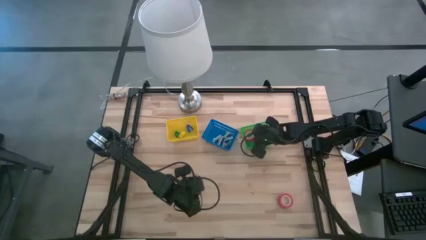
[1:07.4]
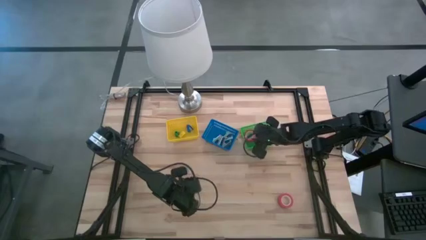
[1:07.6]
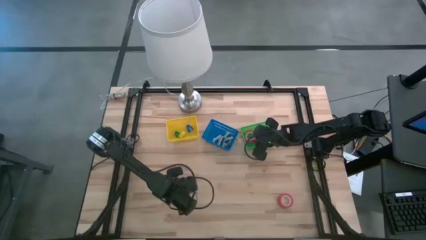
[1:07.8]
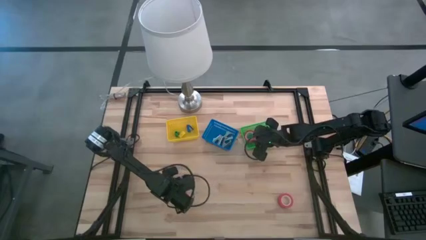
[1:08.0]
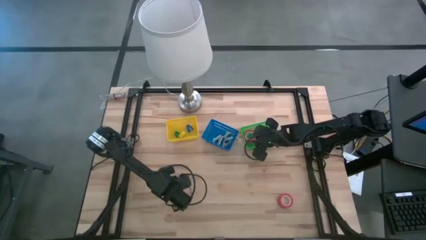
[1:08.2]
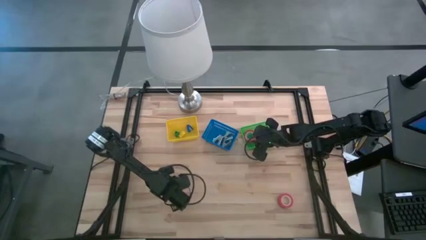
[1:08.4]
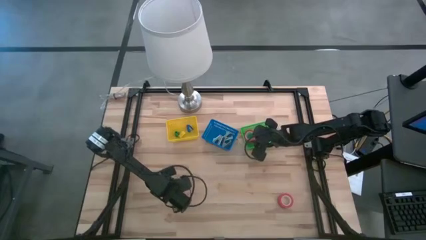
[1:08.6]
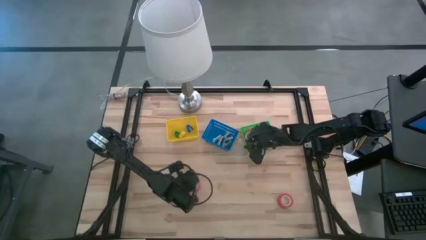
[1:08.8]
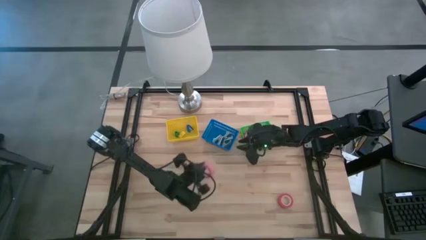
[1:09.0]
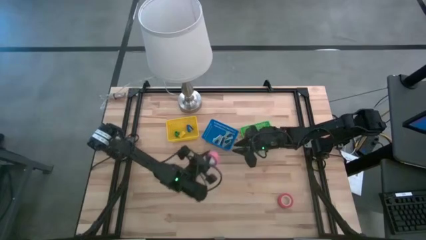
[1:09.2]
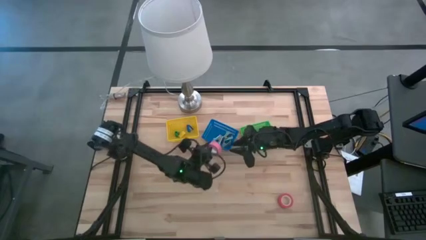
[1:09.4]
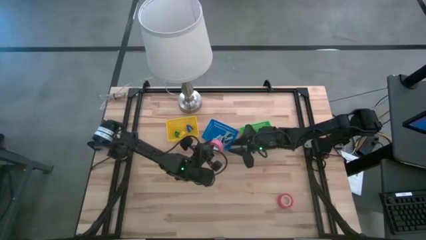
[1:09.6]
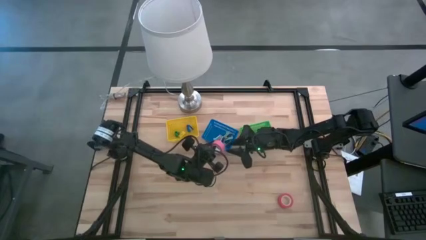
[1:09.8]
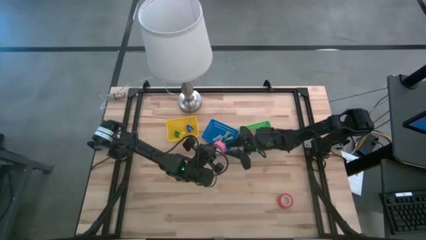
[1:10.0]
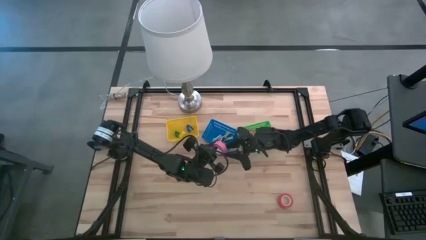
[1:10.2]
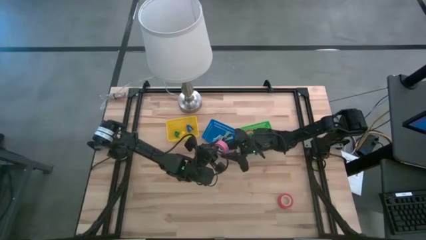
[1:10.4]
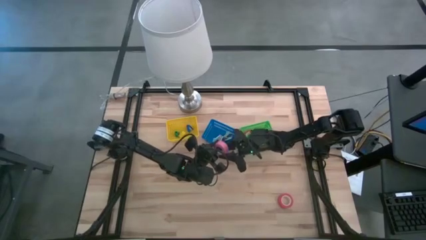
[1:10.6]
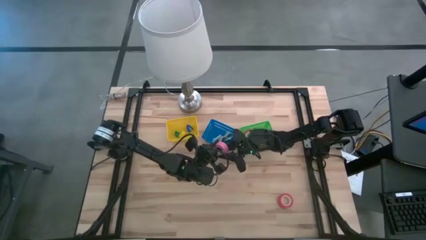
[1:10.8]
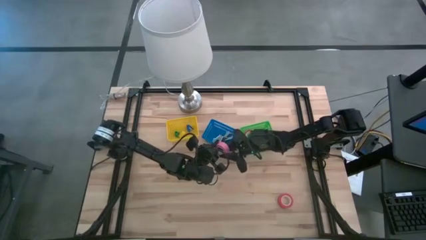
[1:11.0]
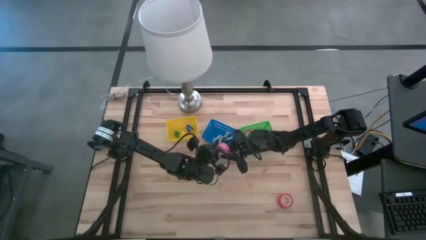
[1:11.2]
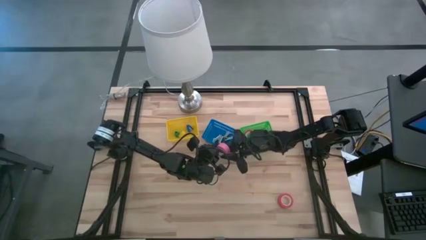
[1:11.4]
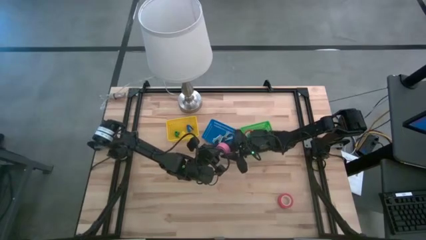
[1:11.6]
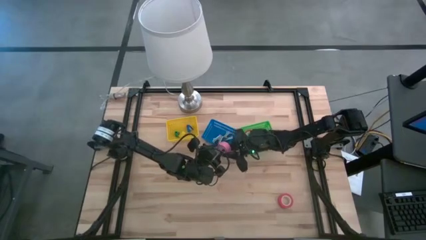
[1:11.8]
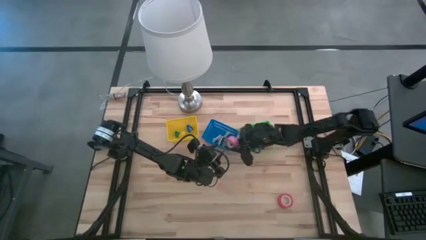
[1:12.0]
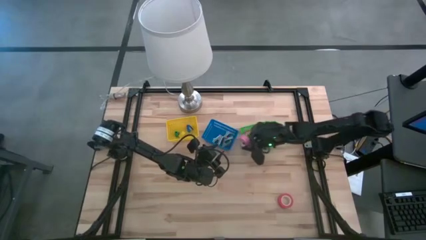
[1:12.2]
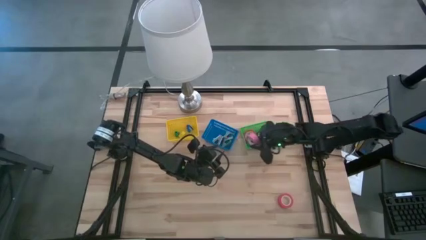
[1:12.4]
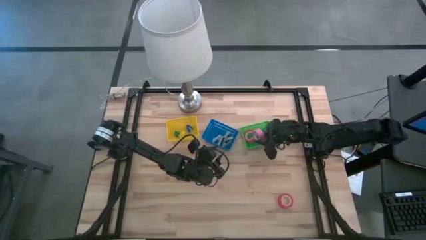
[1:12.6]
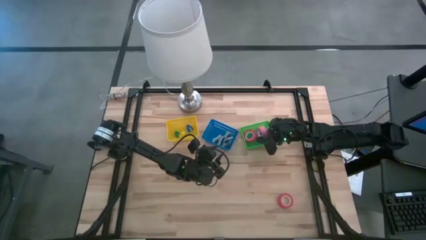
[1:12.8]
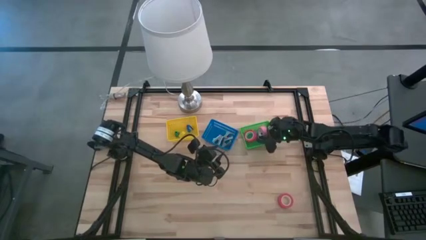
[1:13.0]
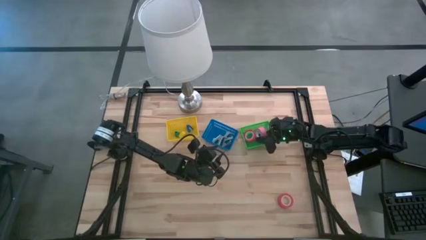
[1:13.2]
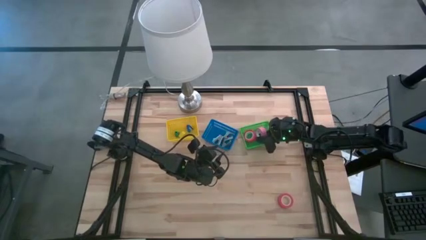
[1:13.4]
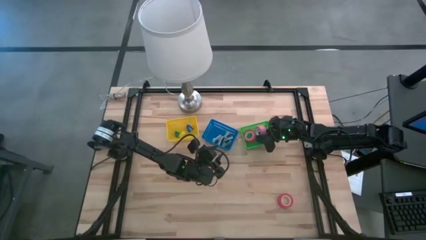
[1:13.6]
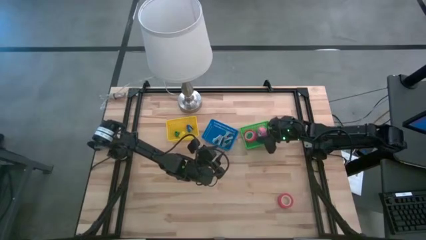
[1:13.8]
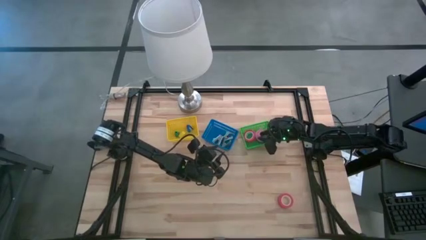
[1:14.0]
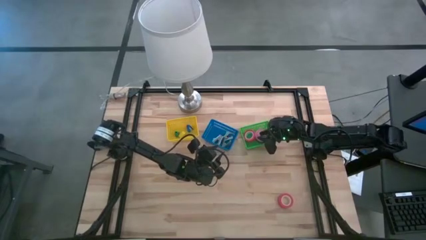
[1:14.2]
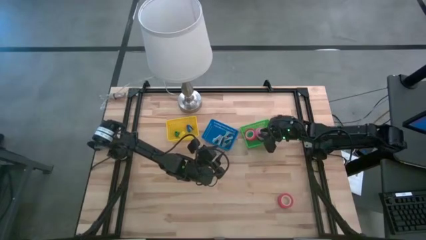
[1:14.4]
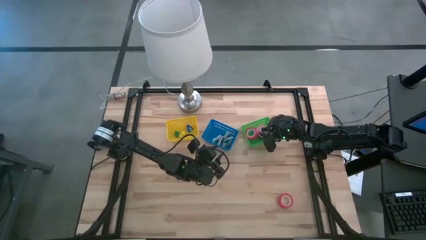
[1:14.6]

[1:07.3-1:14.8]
Task: Pick and place Stapler, Stapler remover, tape
Put the pink tape into the green bin

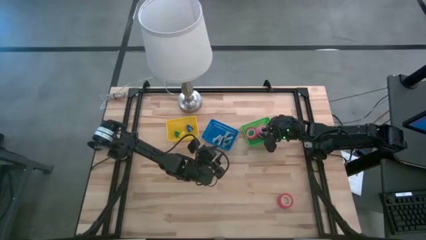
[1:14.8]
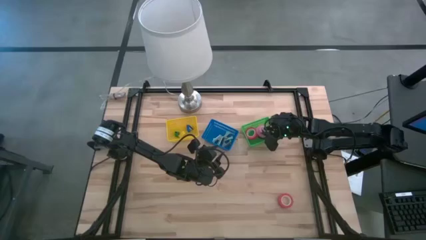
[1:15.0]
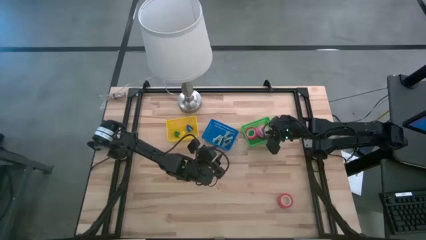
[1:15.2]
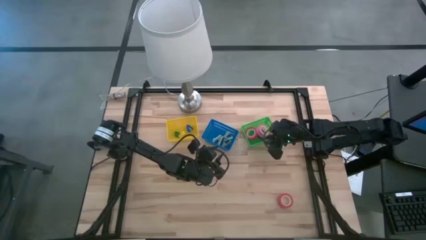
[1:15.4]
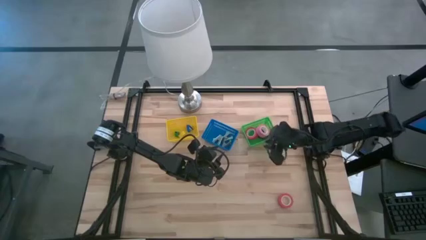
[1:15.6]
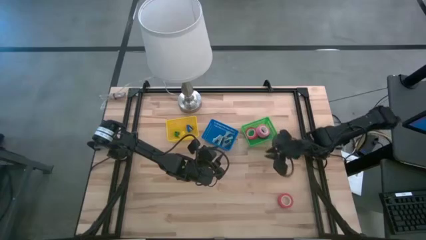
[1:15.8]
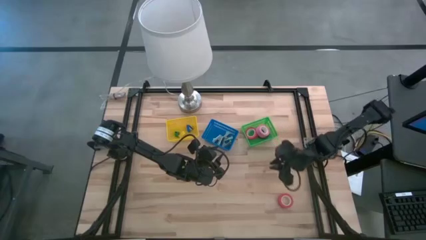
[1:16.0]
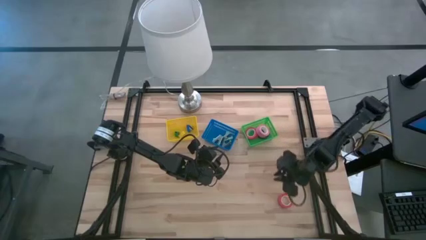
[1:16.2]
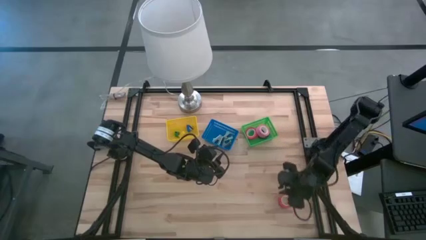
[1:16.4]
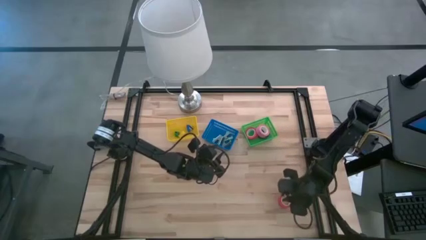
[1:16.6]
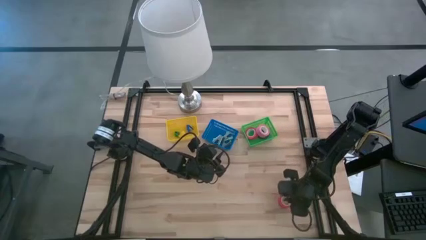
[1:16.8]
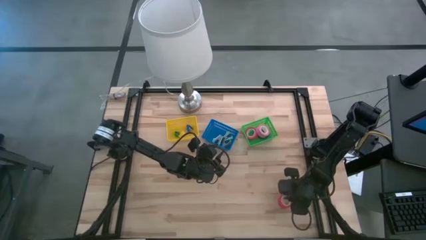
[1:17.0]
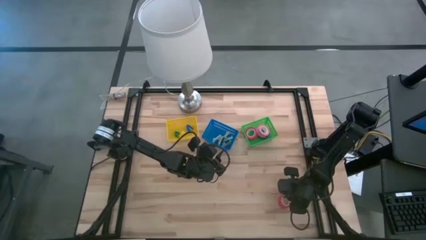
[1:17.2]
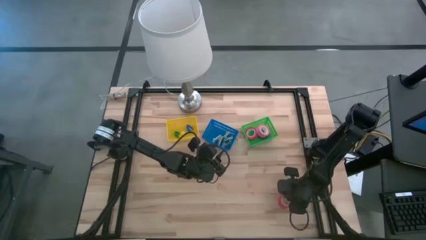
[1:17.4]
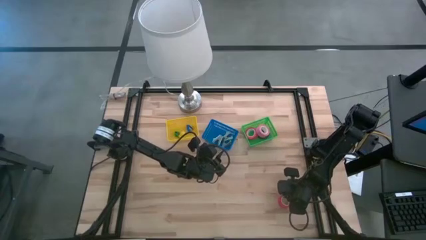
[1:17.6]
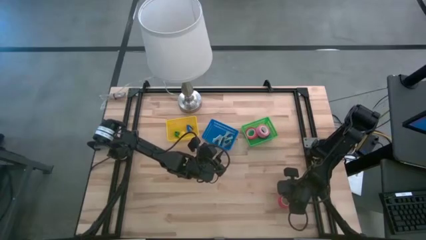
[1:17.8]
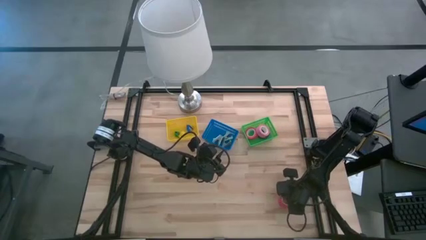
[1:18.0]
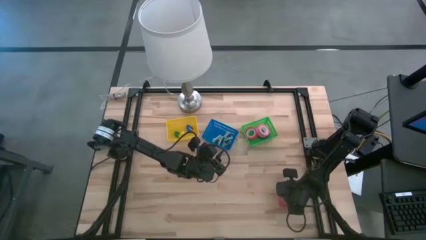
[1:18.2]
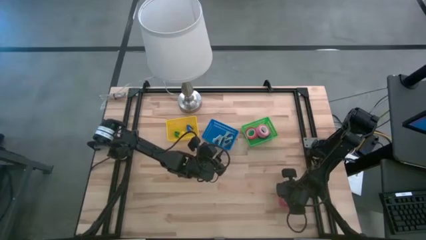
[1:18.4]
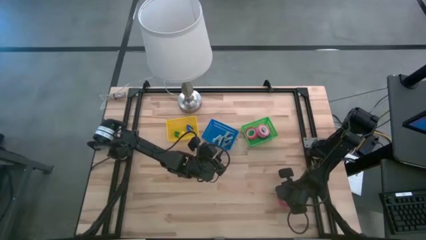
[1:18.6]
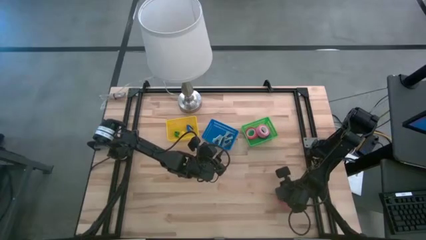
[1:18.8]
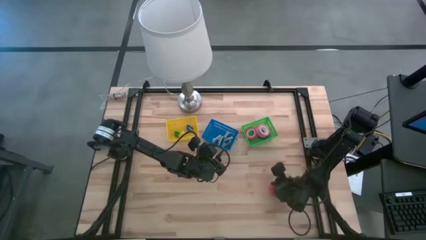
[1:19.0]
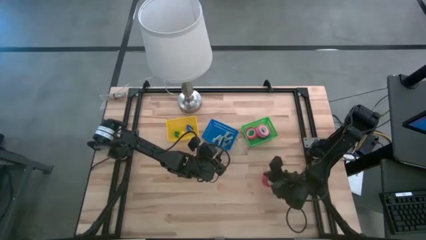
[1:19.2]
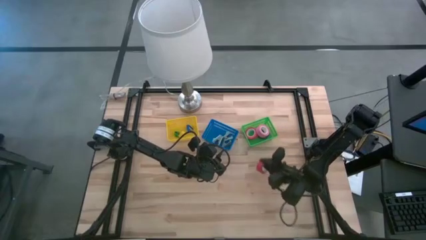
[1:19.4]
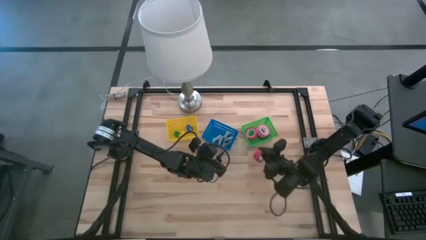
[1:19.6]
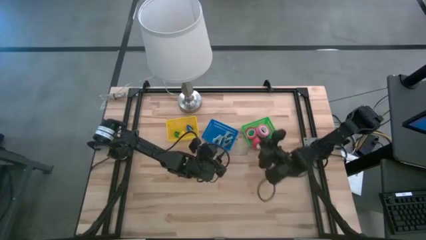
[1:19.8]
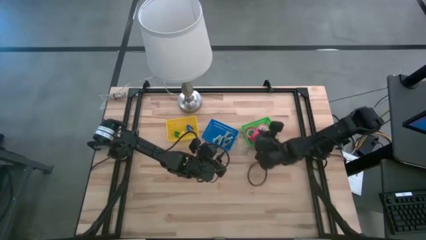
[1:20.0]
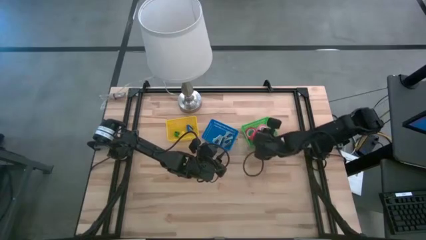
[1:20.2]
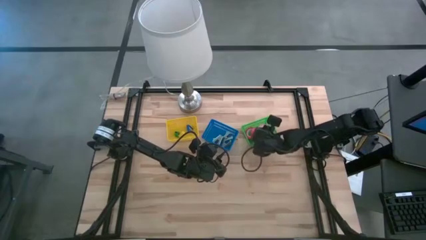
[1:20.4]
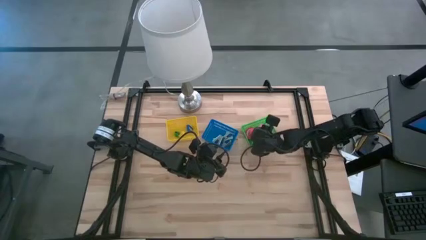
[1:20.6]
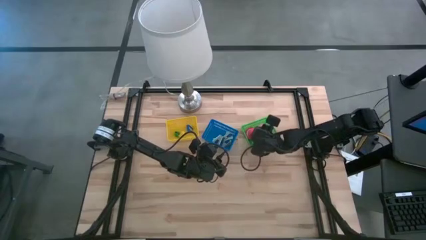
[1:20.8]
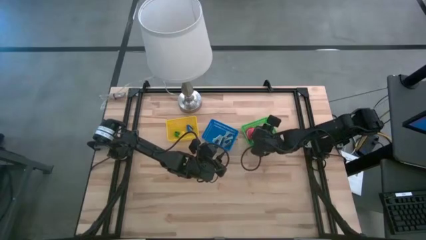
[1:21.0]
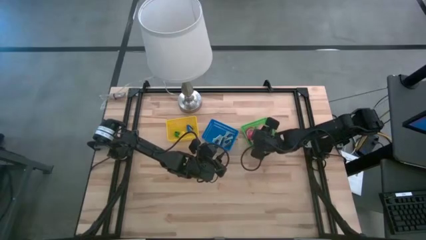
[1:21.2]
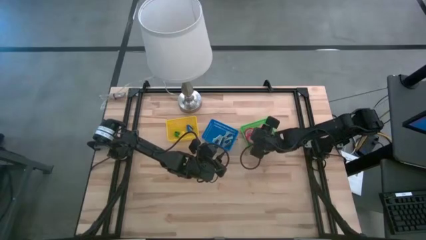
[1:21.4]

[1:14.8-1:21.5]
Put the red tape into the green bin

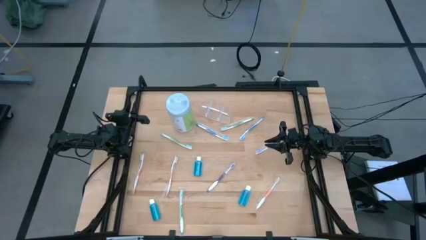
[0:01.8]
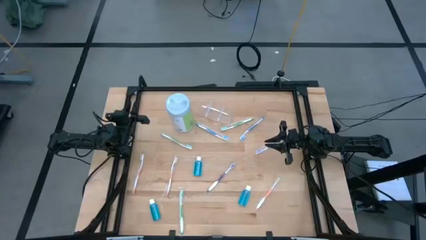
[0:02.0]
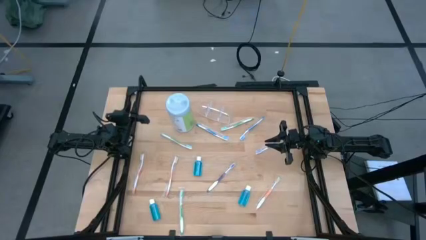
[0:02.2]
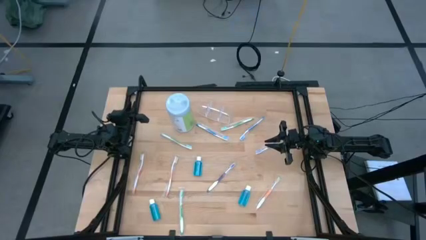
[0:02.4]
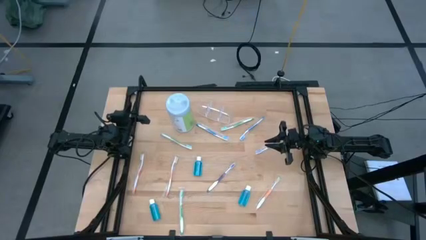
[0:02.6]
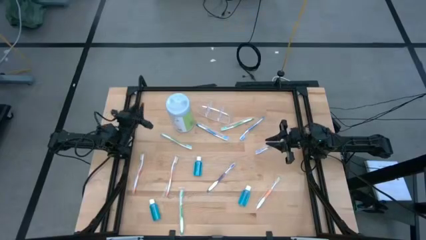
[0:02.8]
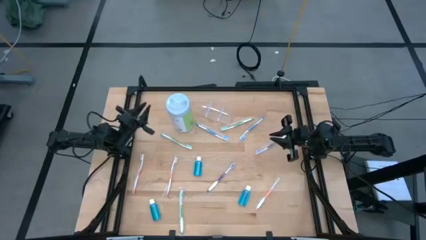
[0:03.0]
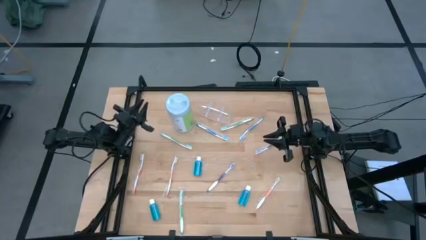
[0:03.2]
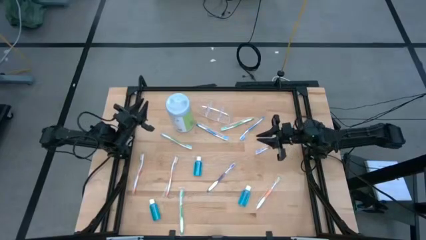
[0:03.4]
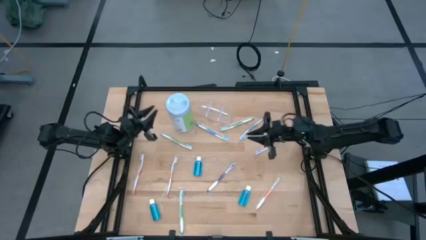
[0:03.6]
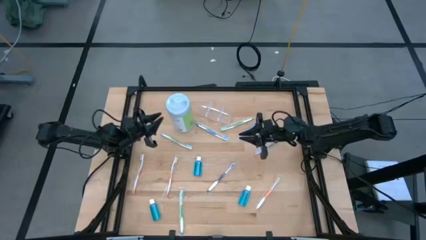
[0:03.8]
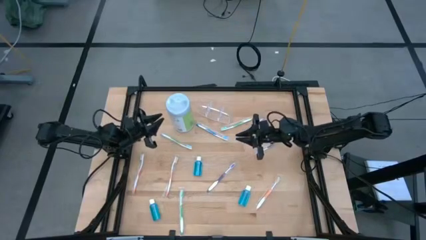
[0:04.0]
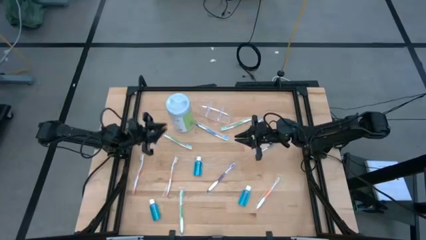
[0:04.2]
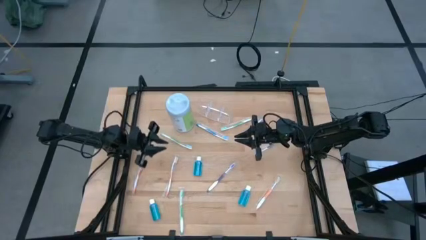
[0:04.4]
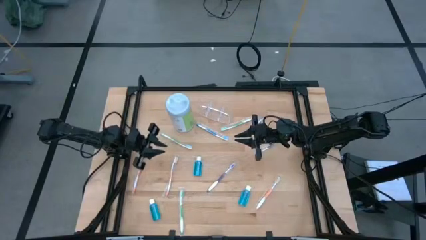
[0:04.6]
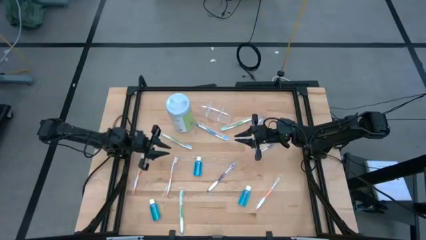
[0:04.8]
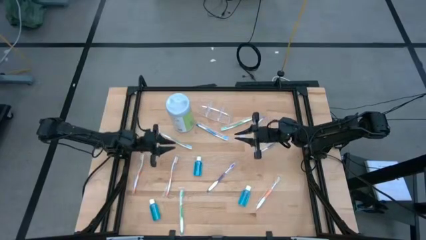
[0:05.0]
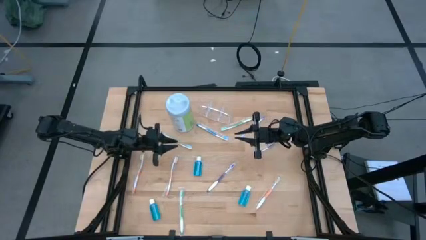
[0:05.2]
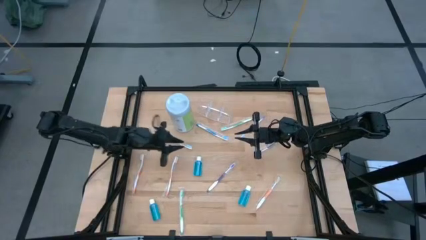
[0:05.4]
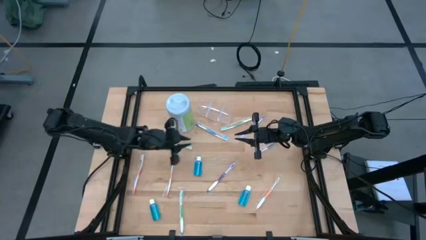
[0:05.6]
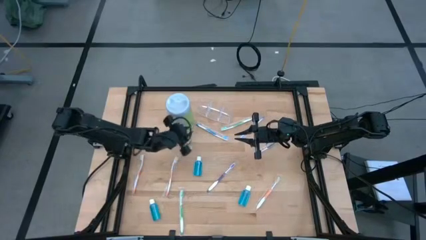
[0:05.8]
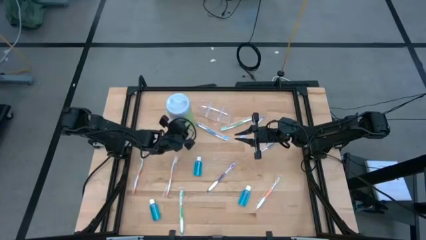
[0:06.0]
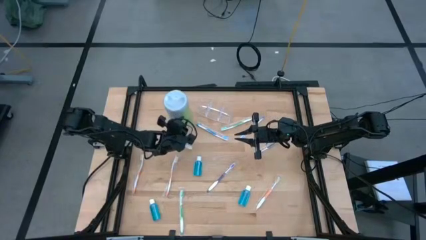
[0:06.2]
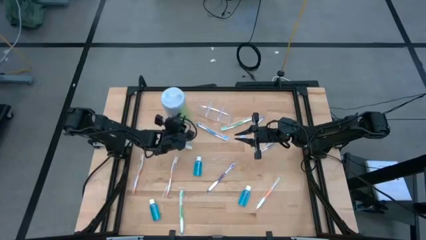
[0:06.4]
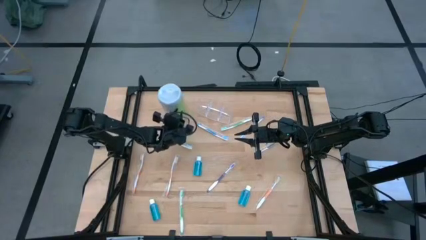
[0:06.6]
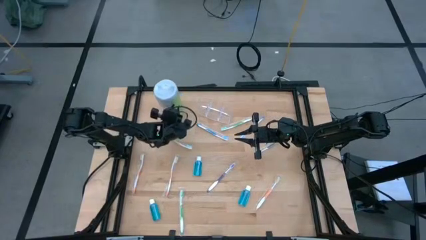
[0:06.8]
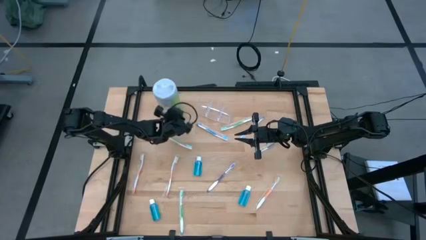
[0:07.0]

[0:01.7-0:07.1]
Task: Pick & Place toothbrushing station
Adjust the green disinfectant wipes
